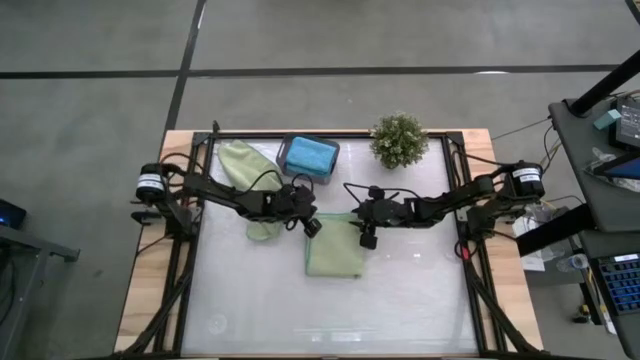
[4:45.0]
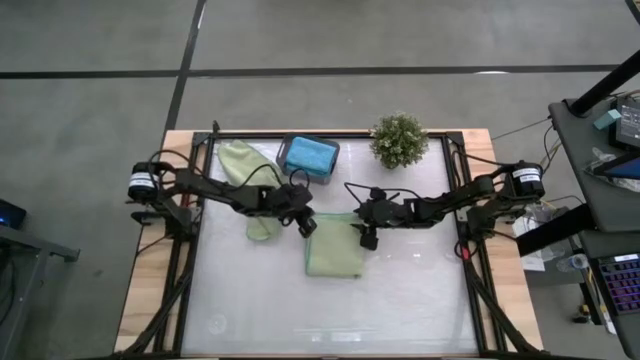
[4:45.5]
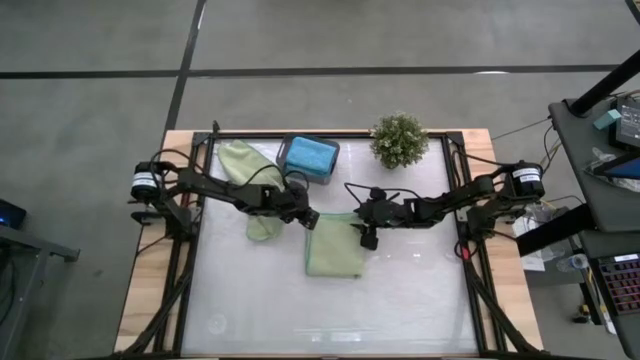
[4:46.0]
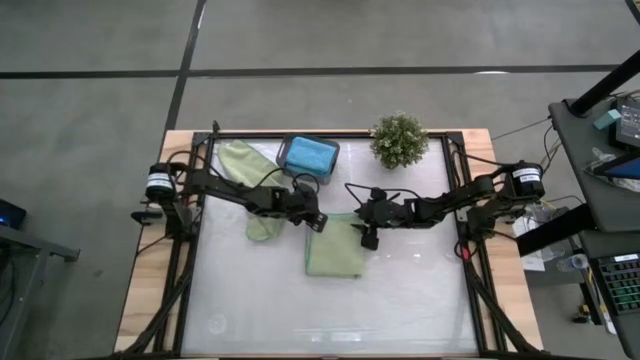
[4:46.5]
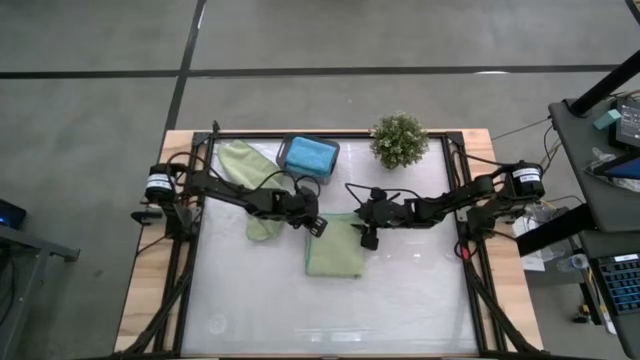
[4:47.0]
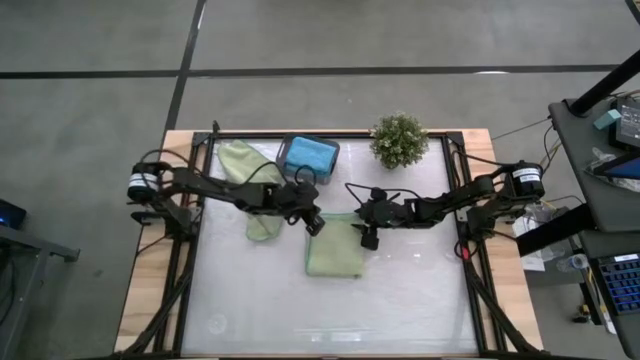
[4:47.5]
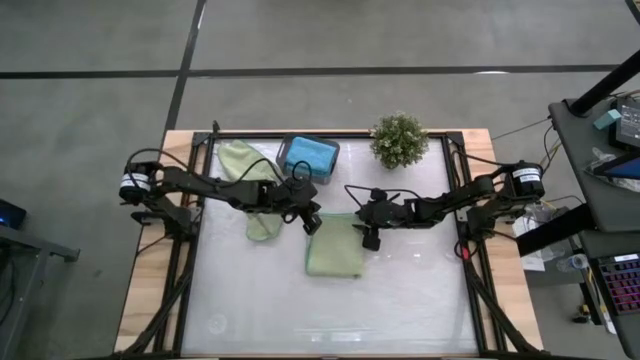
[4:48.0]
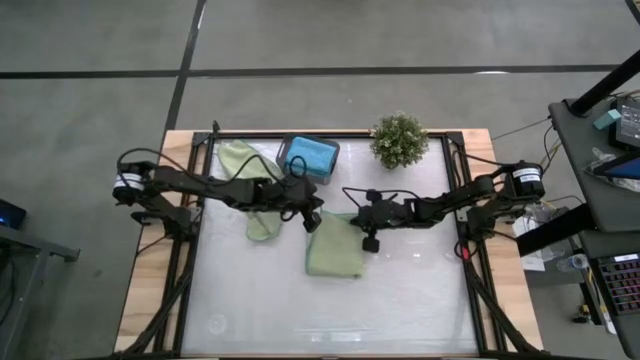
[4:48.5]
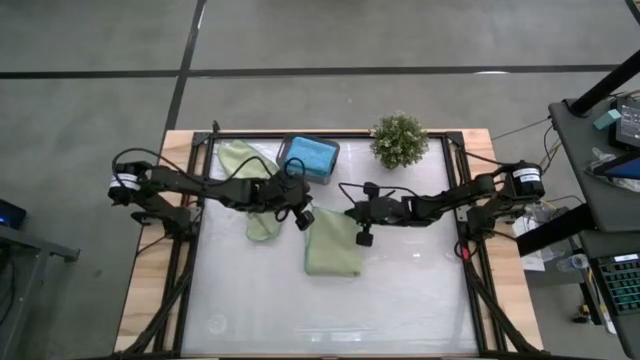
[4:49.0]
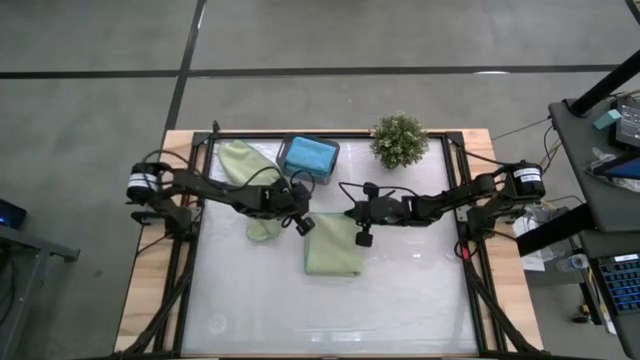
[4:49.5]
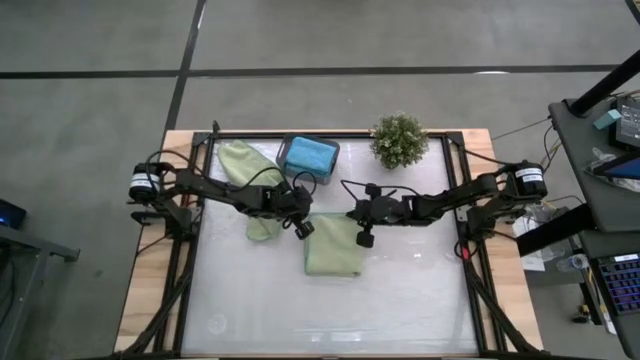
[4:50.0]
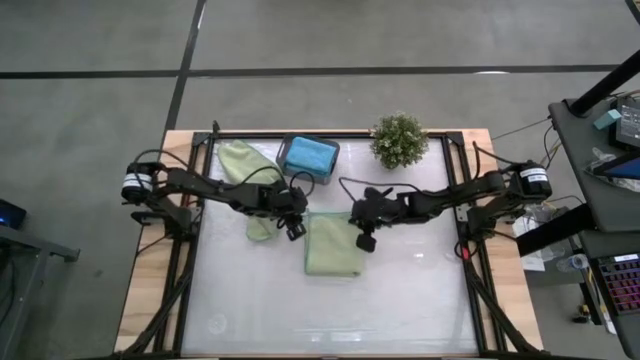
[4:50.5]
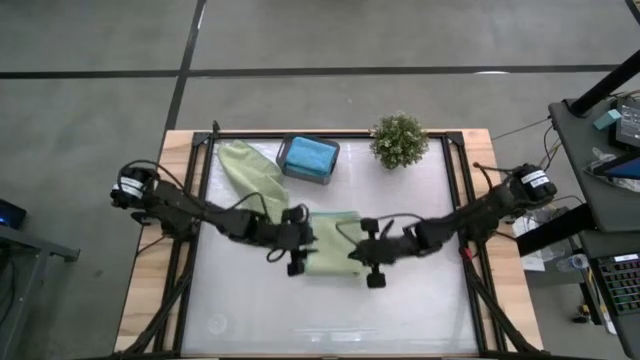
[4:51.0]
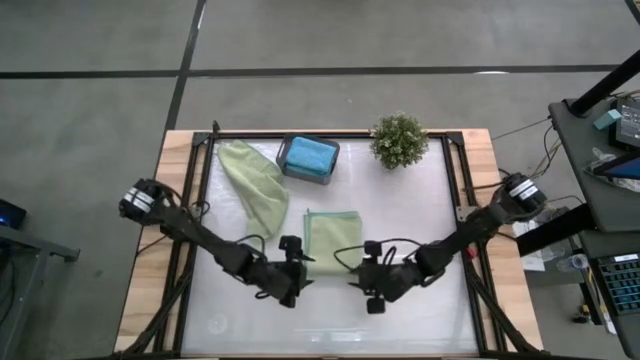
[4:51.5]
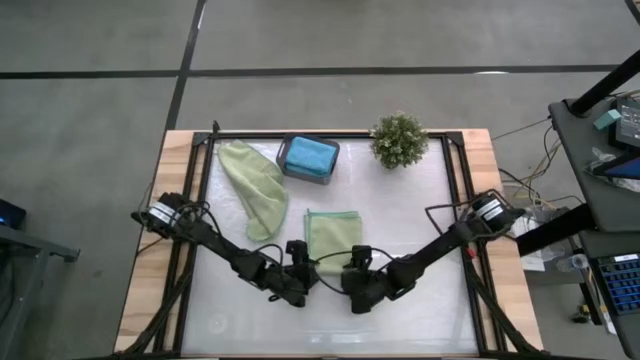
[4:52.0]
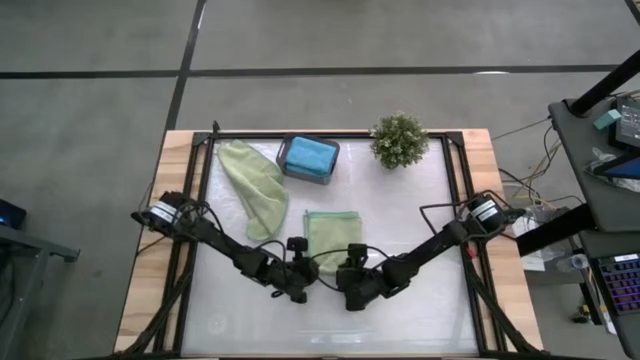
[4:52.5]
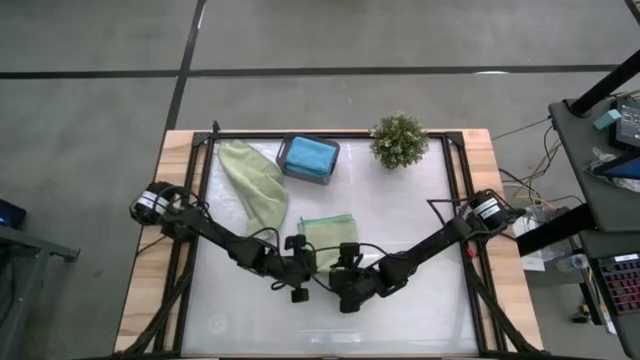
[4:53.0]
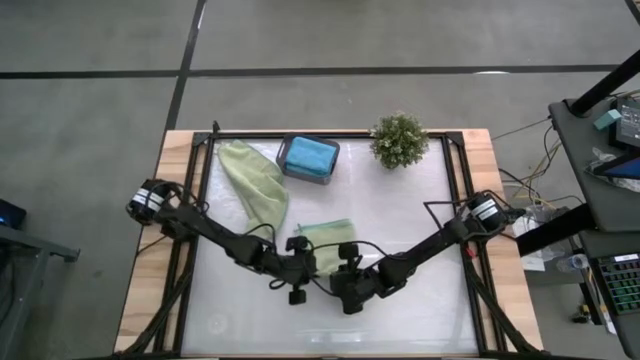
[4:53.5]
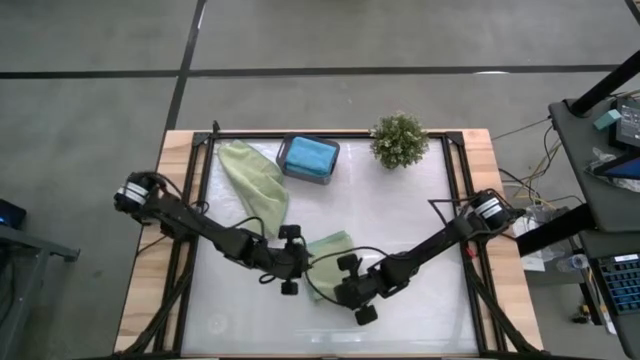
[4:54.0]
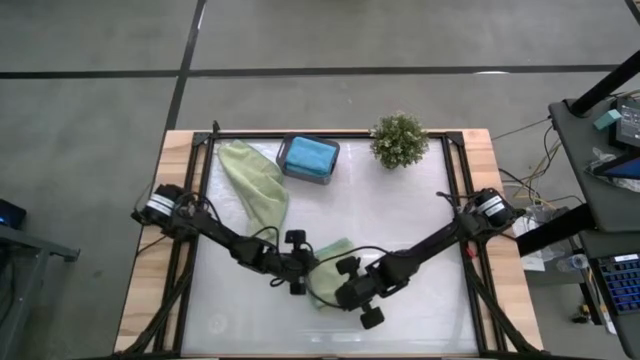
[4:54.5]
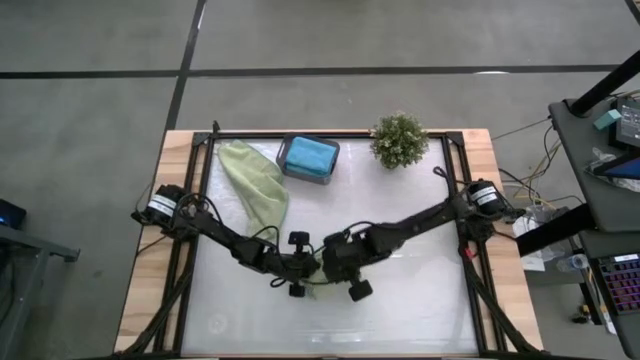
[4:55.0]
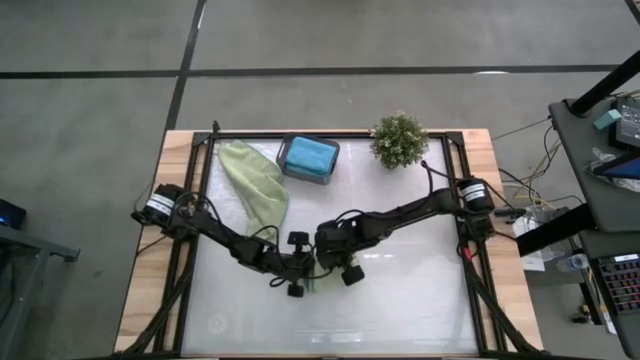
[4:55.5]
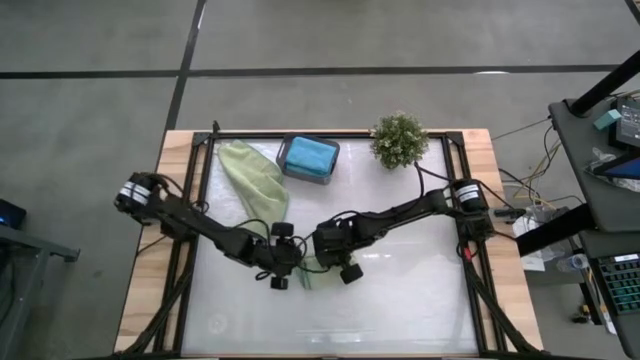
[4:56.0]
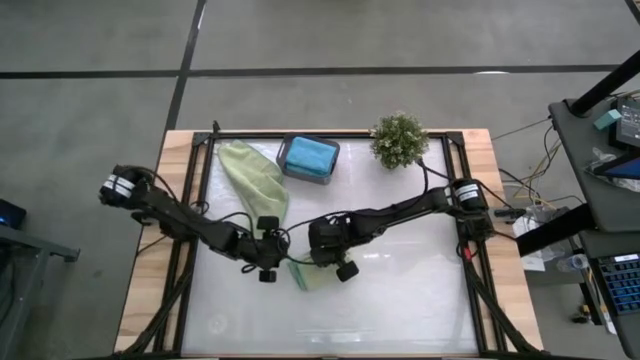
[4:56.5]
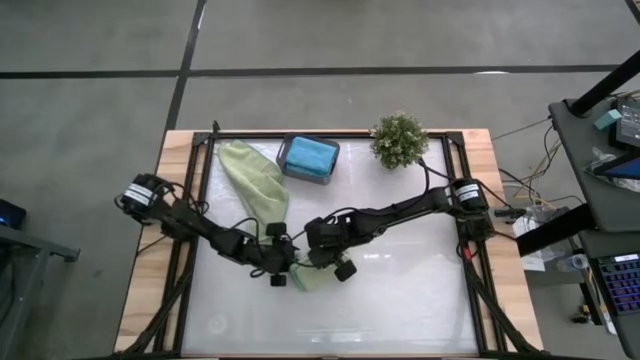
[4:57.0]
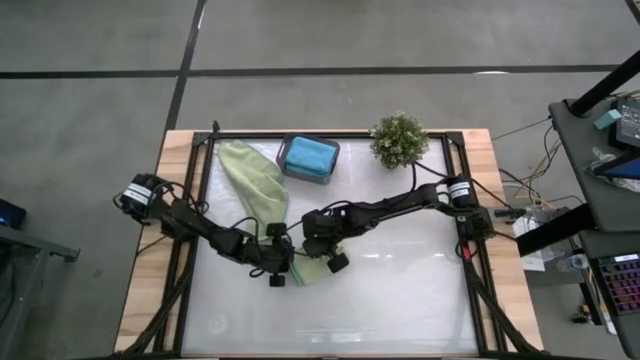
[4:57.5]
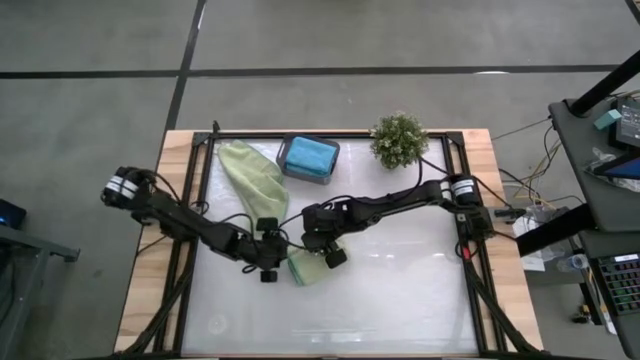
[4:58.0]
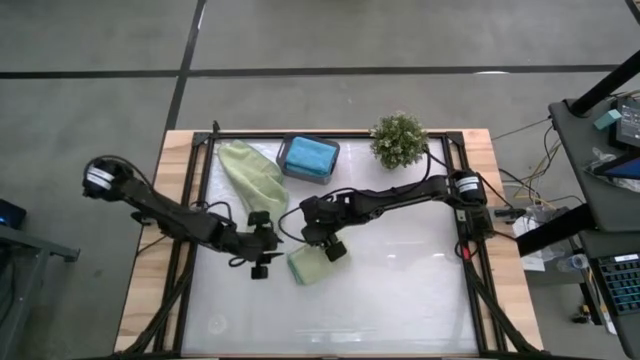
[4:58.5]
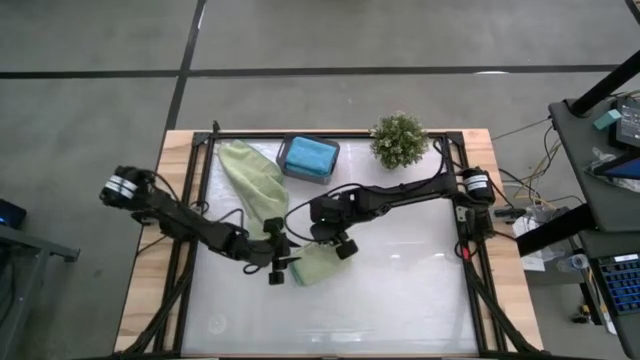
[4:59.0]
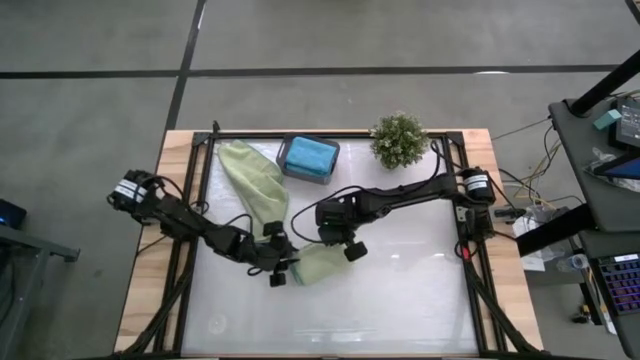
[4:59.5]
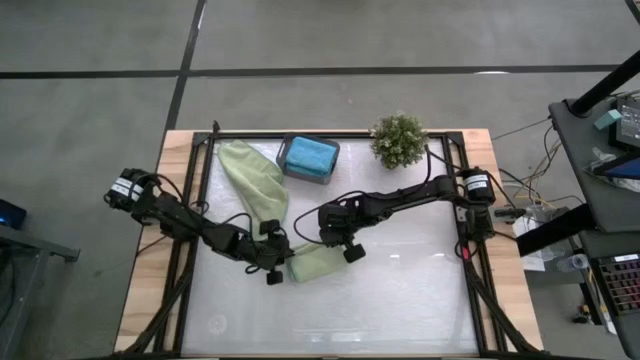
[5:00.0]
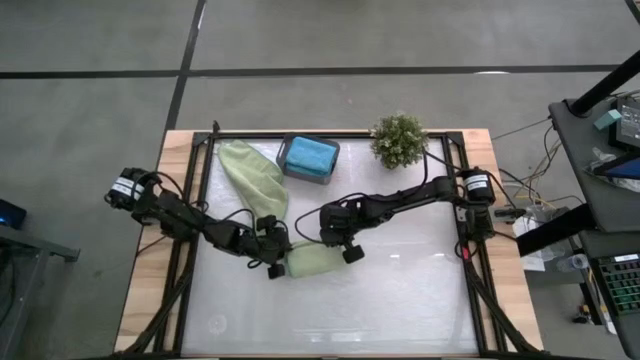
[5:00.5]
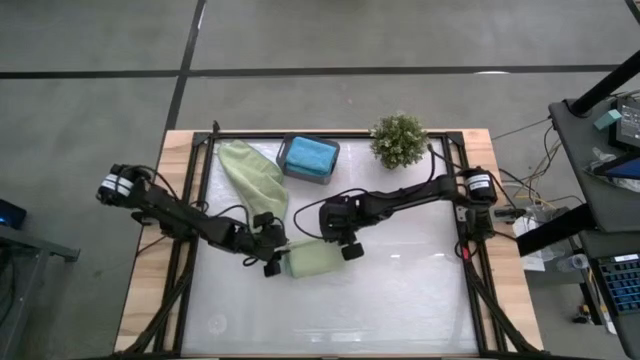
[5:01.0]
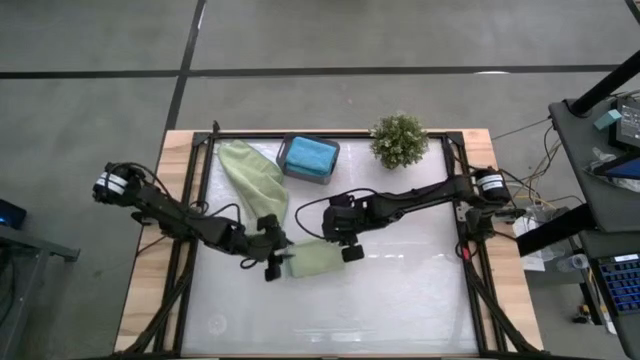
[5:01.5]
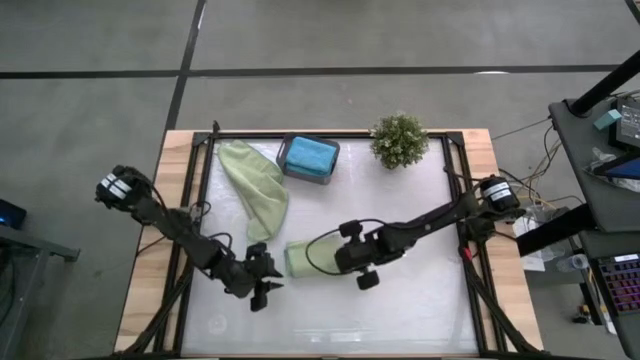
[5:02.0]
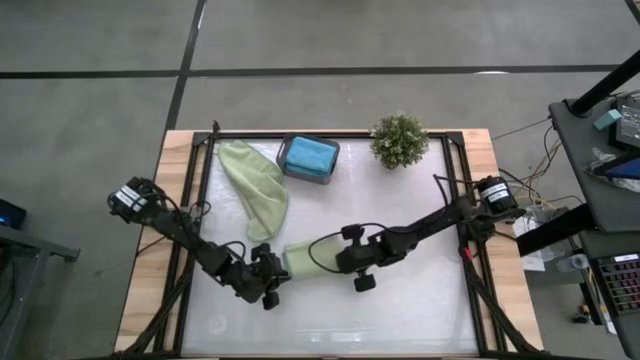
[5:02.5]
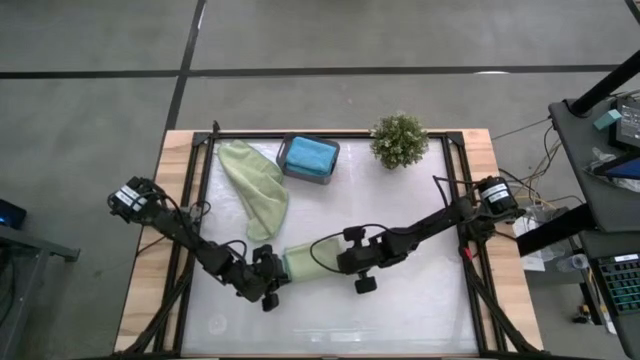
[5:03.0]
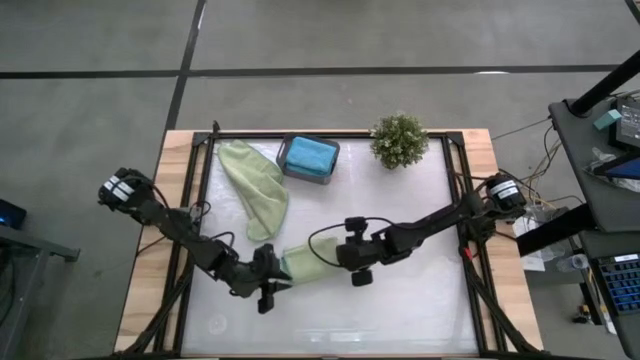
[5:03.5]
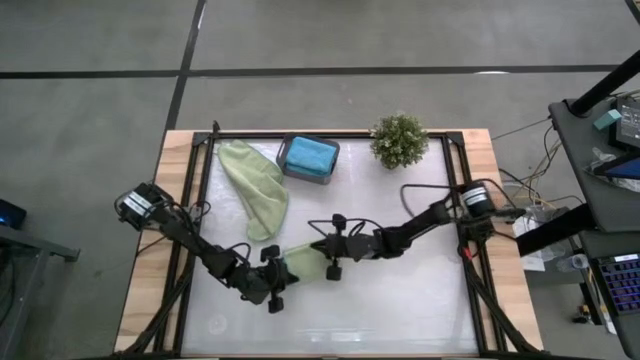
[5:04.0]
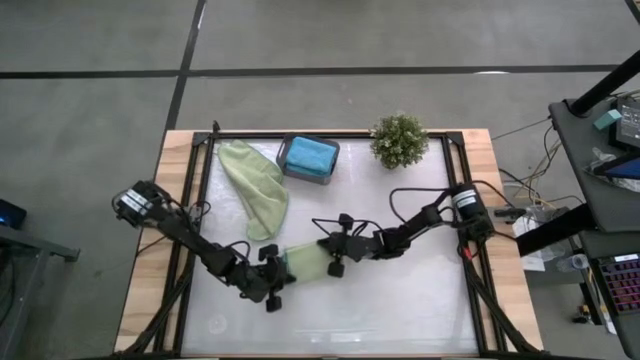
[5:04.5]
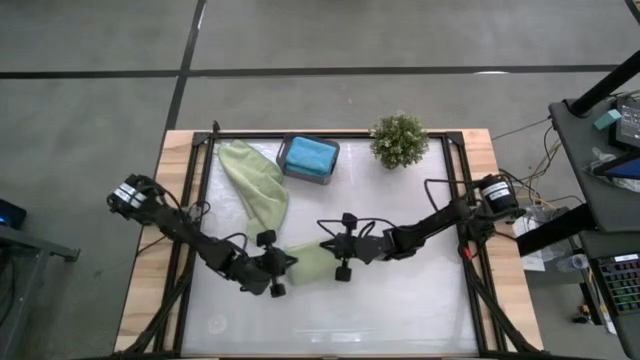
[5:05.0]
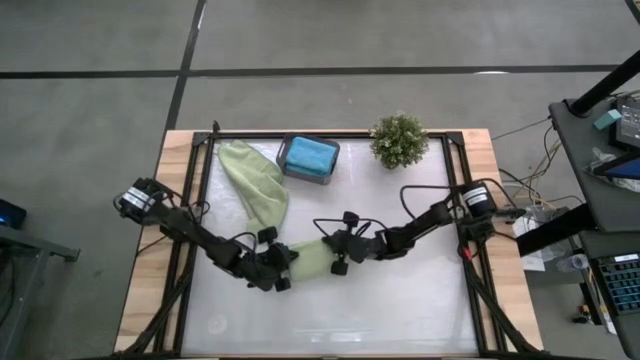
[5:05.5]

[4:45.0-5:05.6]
Task: Fold microfiber towels
Fold the bottom green microfiber towel

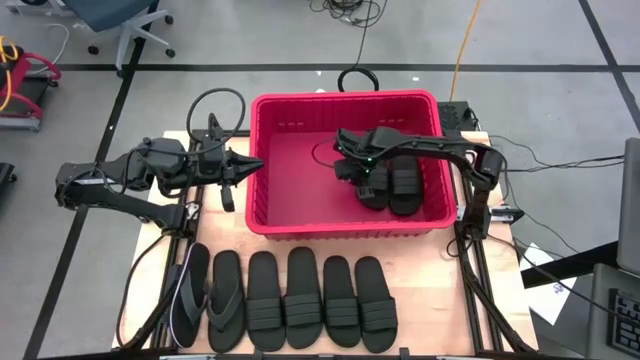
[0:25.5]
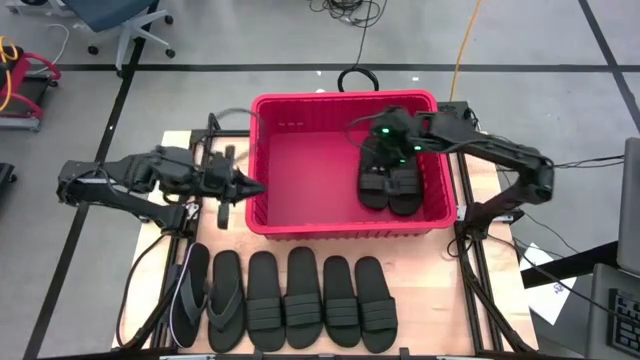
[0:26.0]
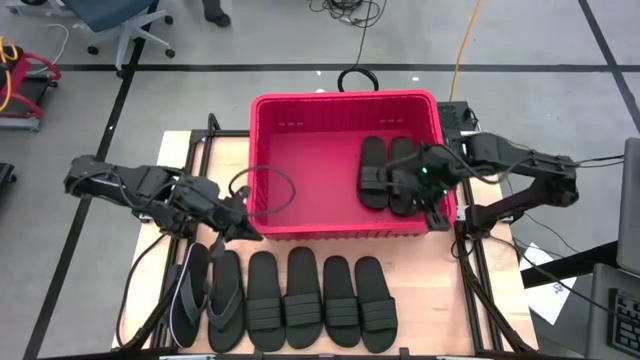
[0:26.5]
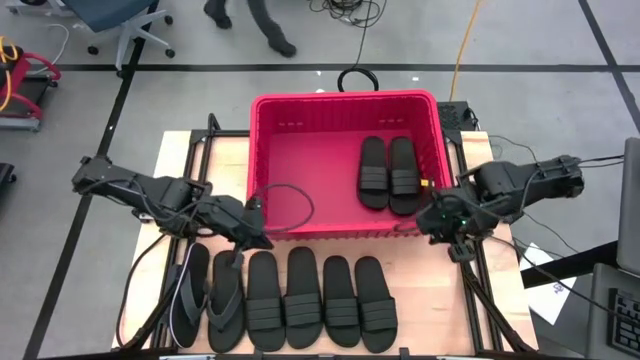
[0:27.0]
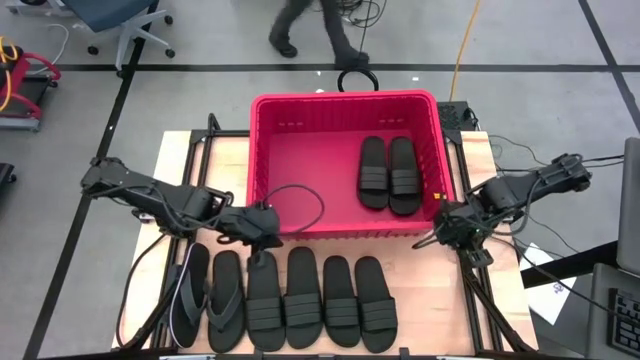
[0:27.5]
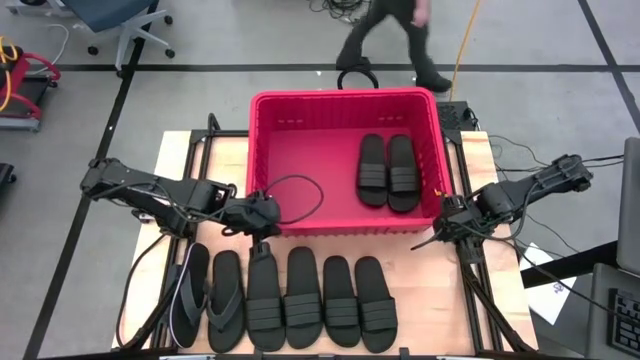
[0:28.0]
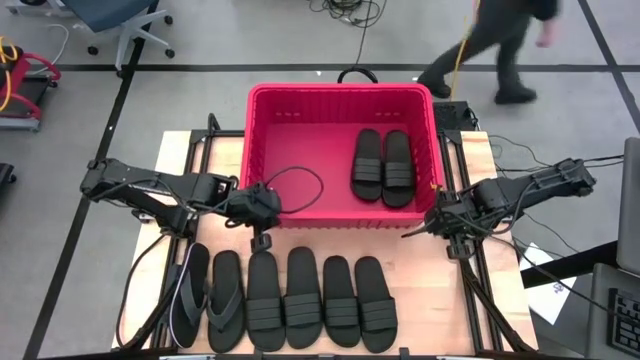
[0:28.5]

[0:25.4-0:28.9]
Task: Pick and place slides into bin
Adjust the red bin on the table
